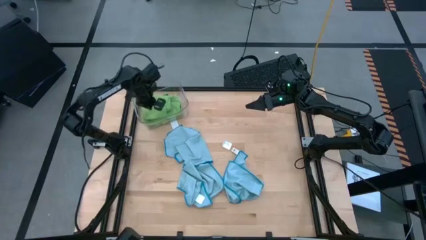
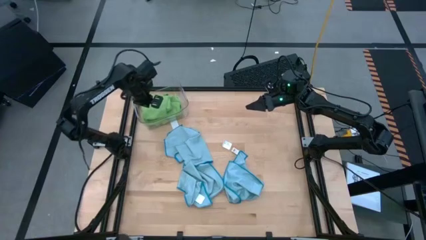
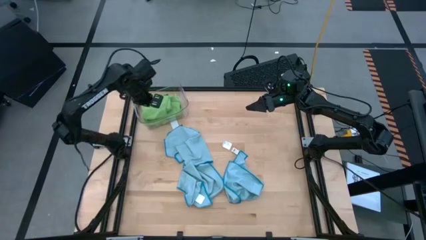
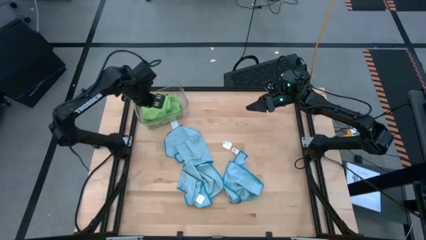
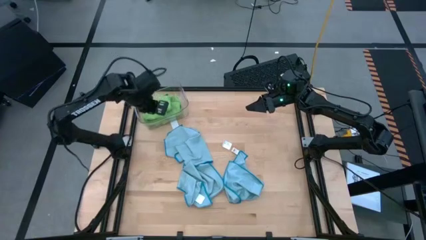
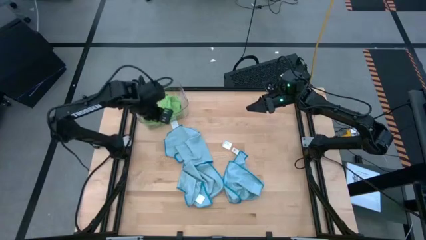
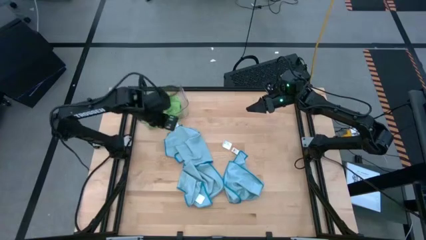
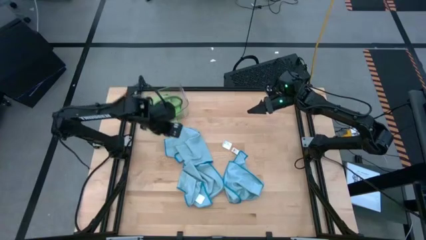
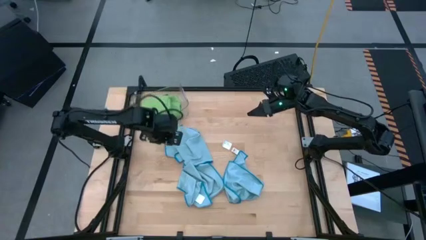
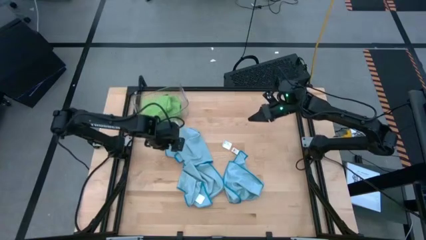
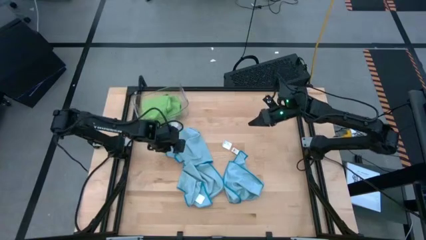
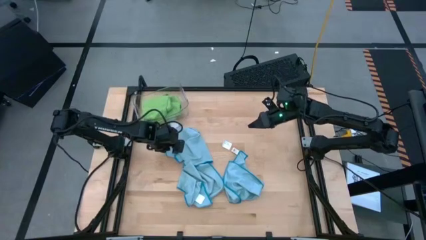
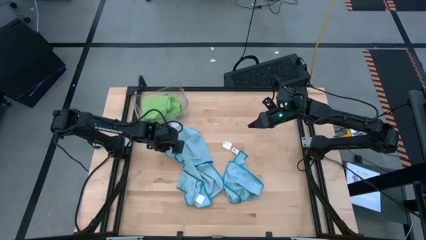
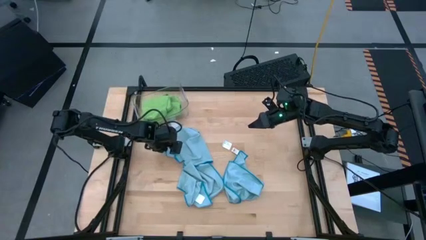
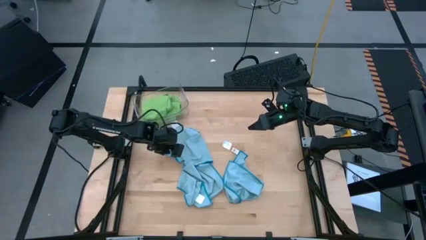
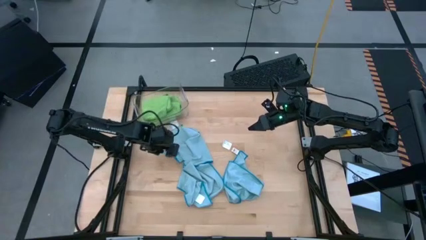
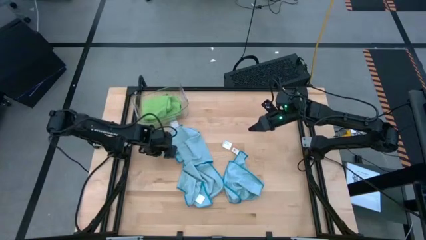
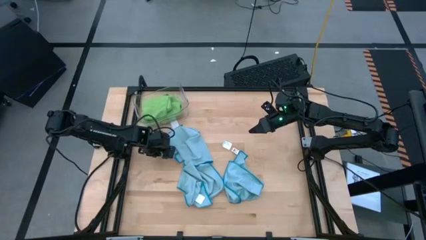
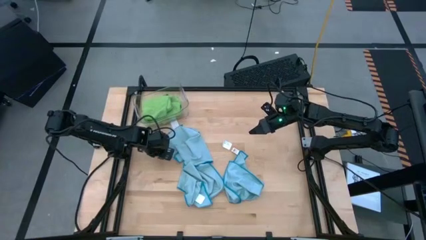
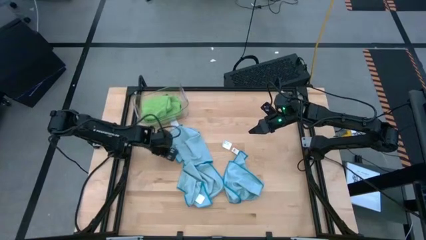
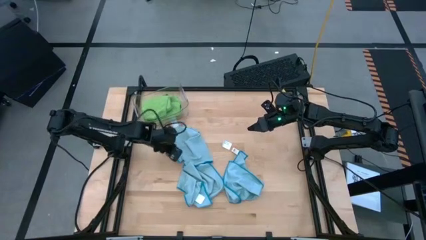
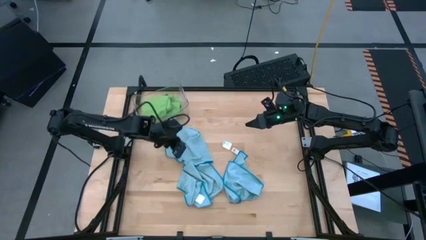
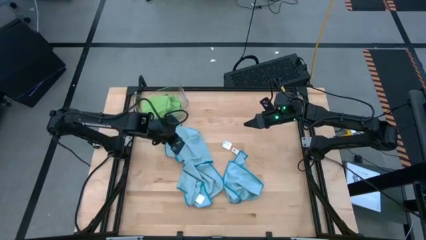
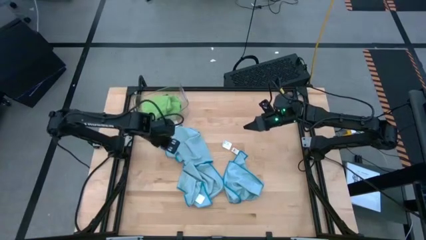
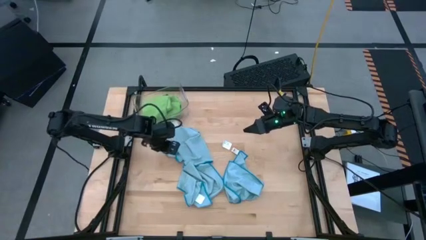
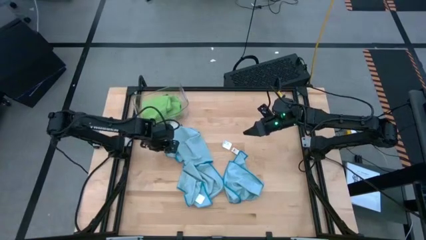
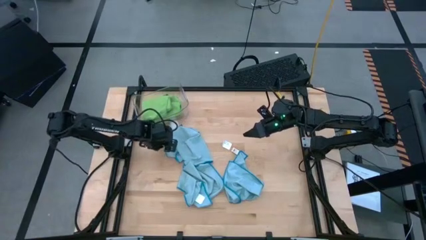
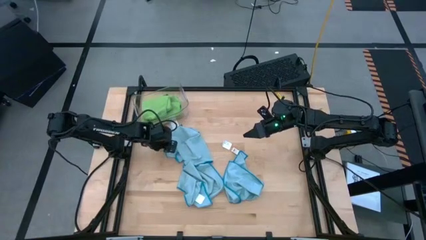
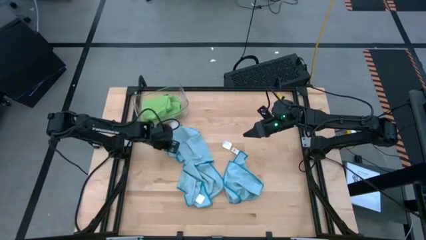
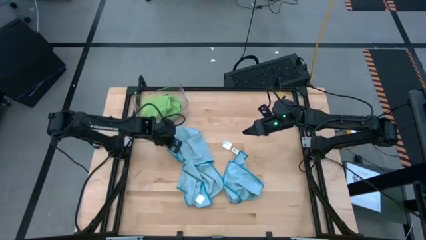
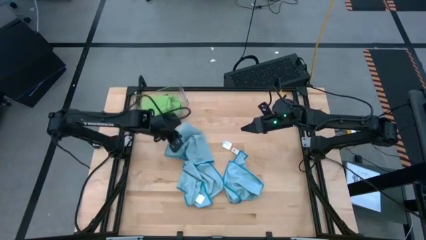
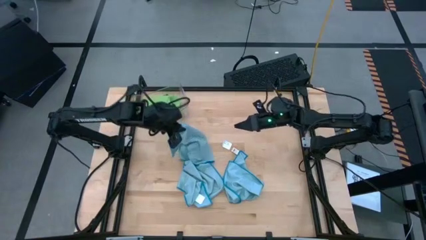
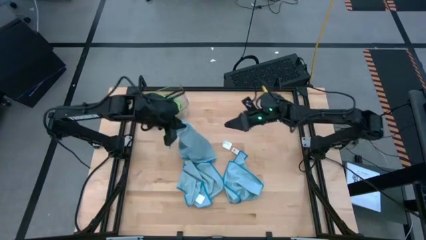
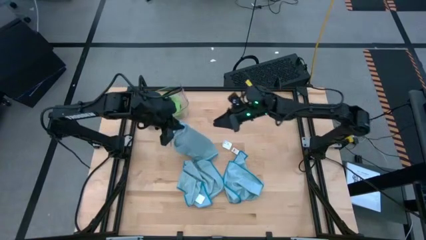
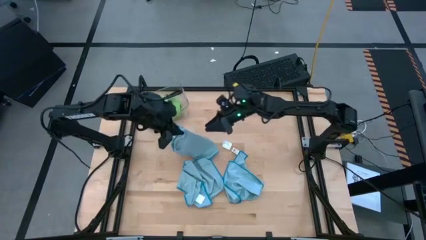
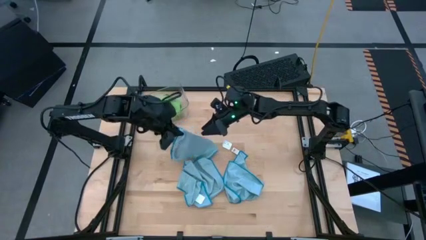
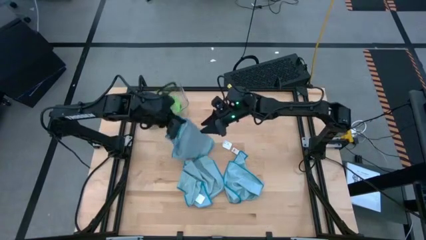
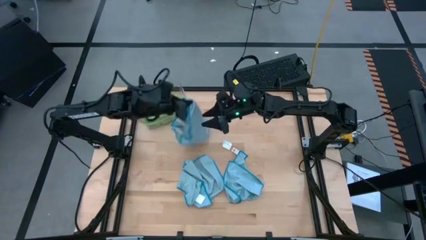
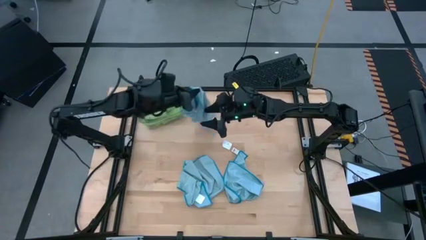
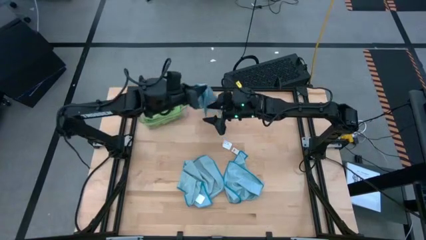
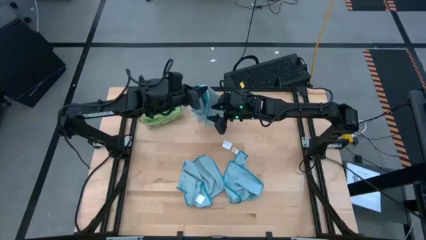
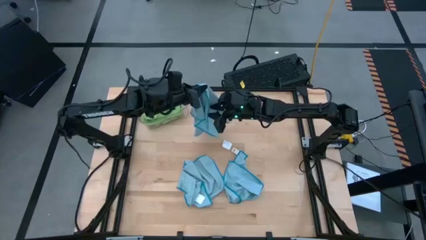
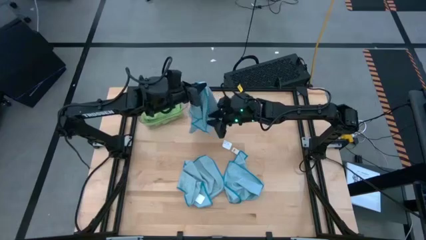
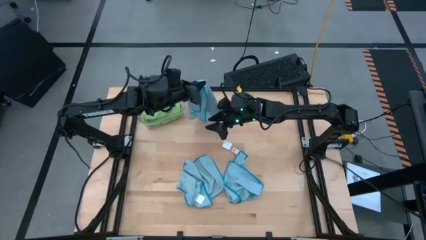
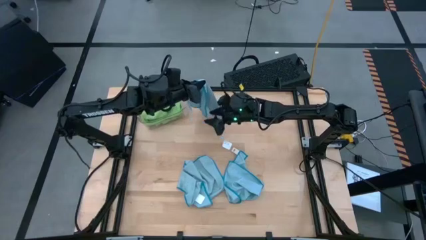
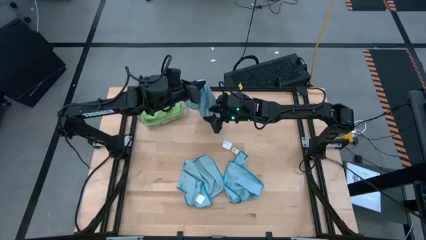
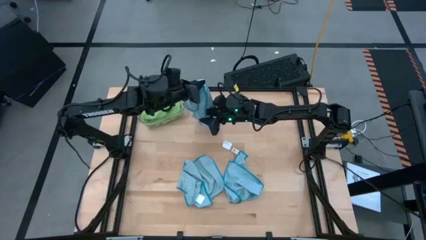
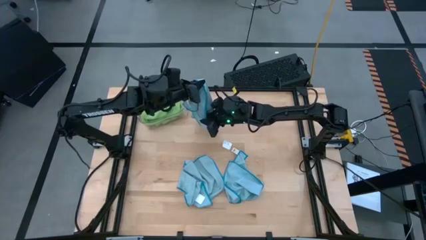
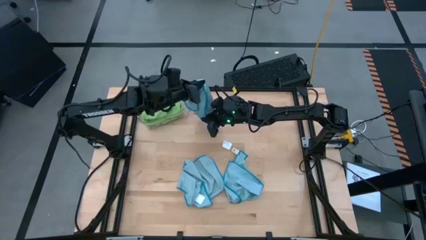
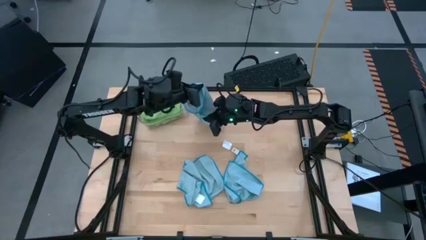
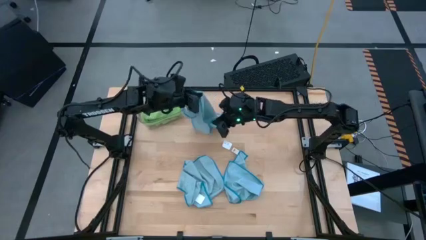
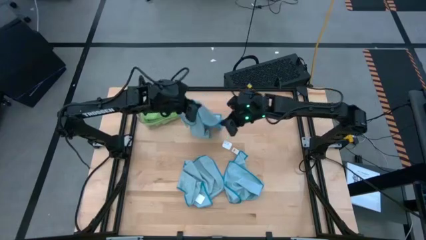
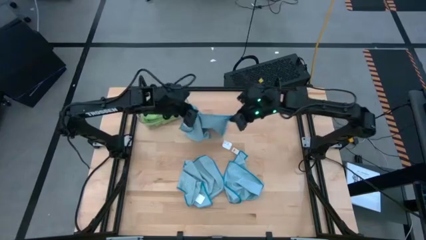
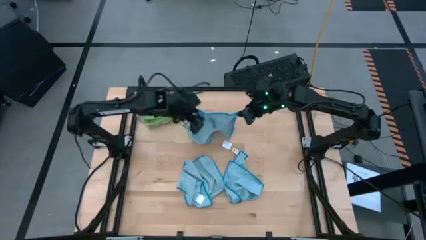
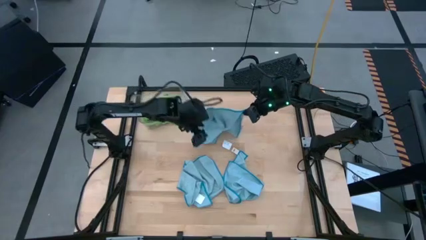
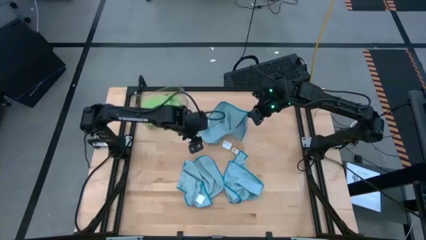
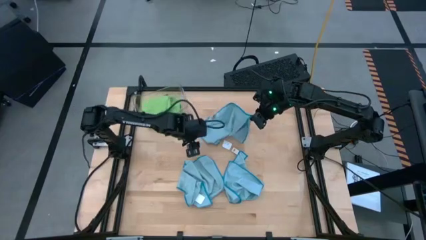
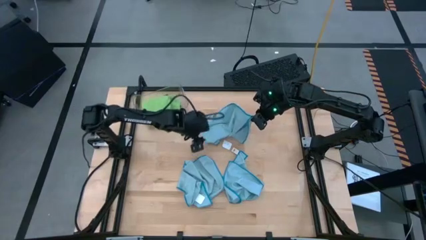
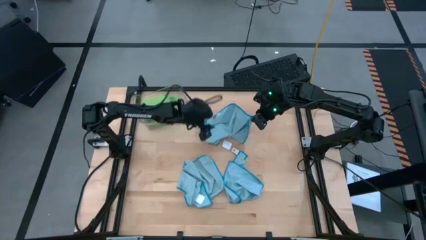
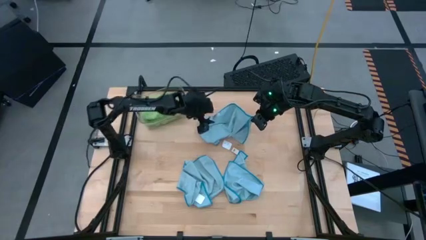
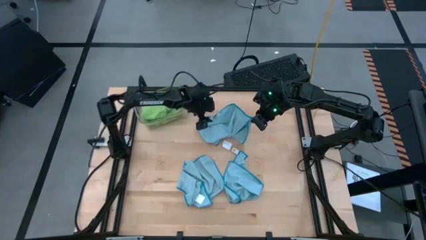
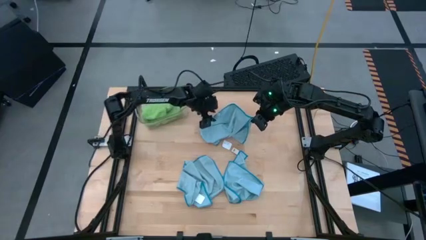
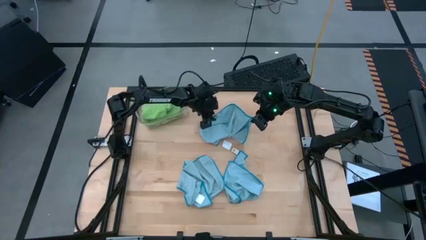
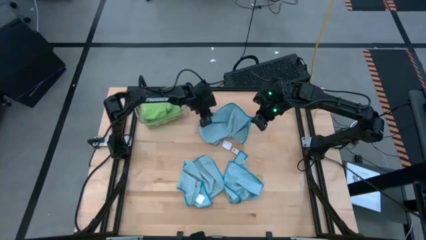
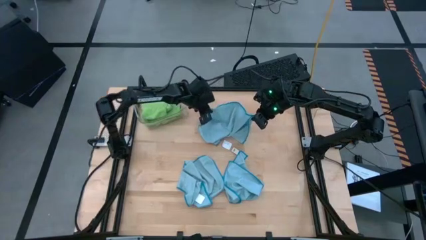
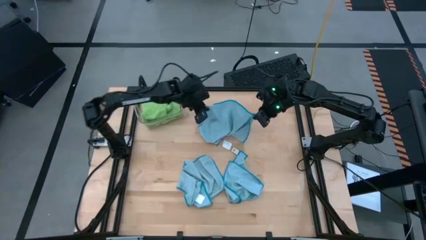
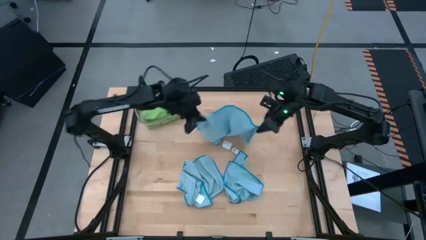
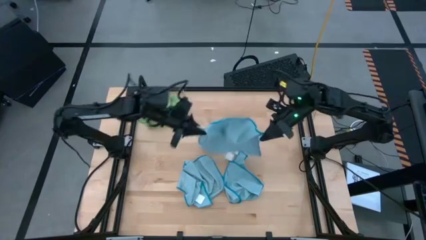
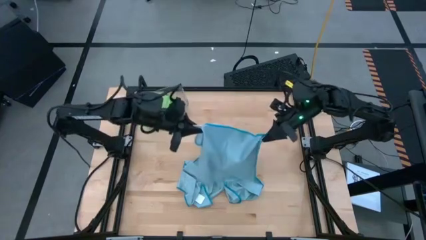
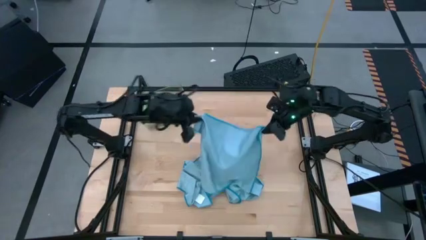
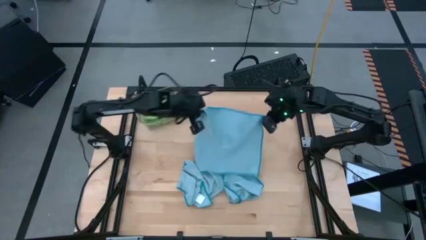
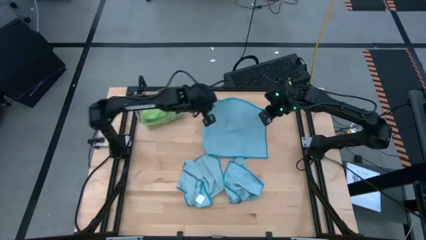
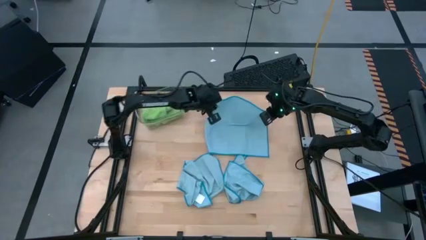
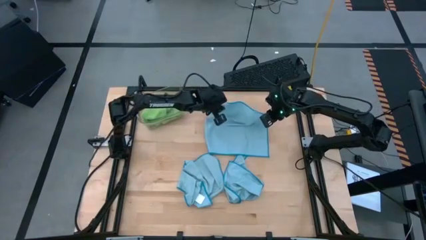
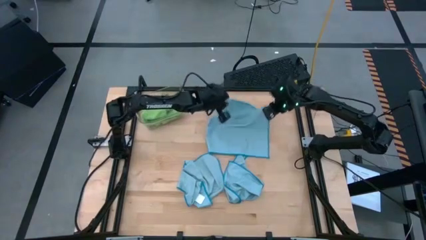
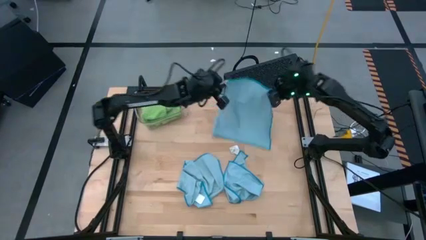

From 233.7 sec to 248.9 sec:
Task: Fold microfiber towels
Fold the top center blue microfiber cloth
